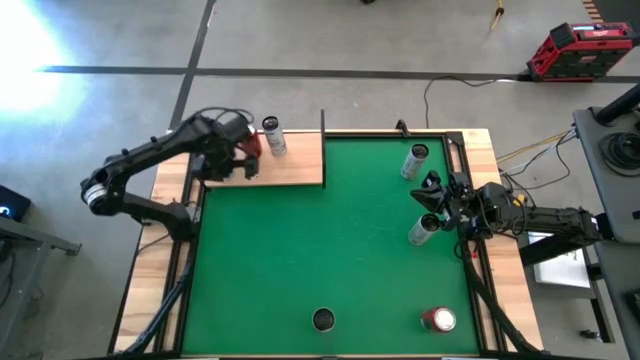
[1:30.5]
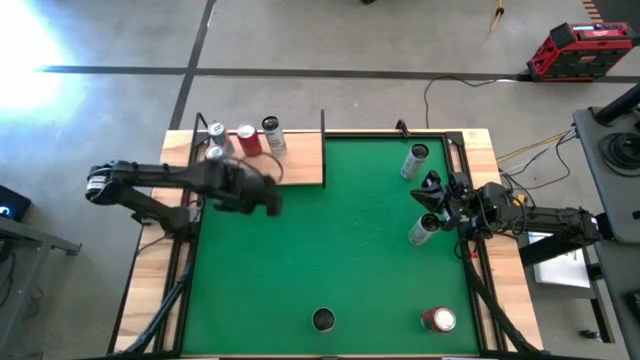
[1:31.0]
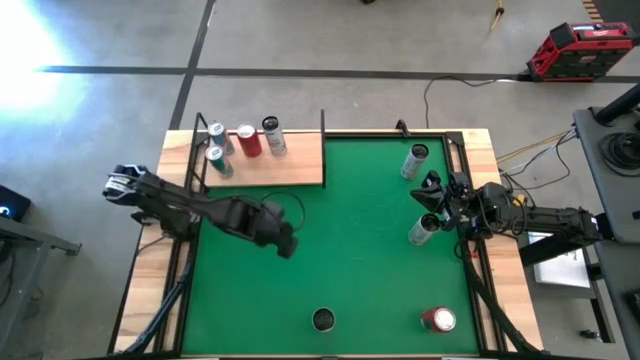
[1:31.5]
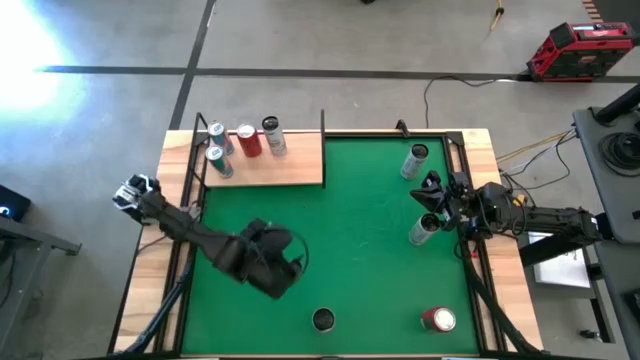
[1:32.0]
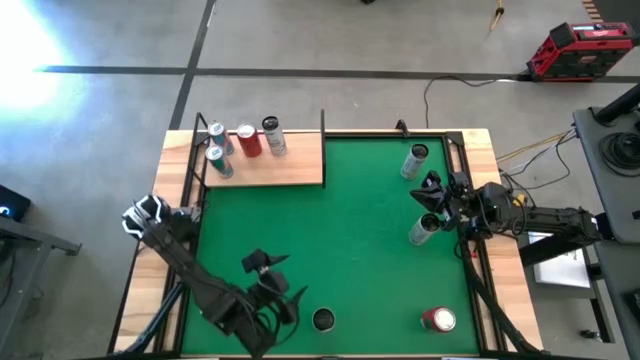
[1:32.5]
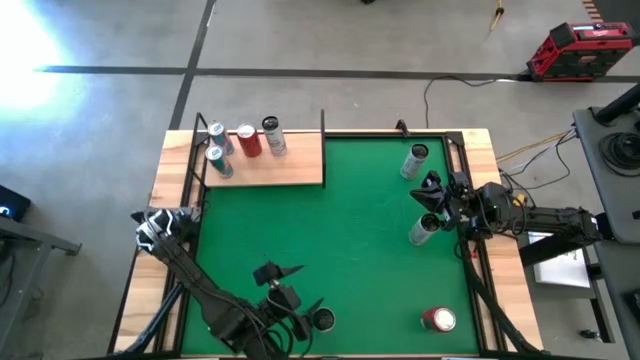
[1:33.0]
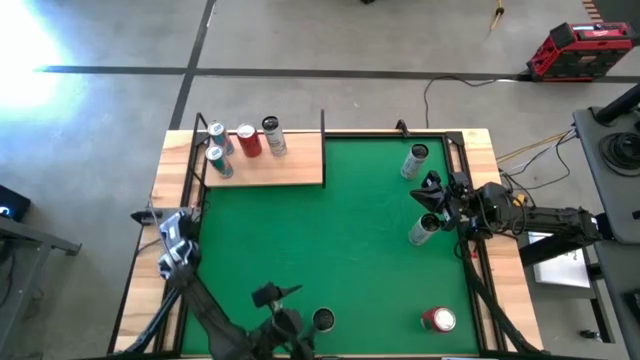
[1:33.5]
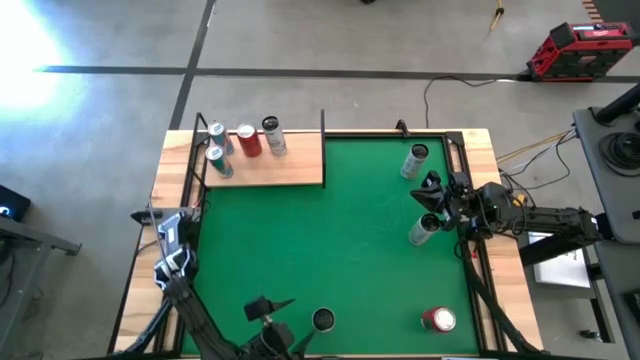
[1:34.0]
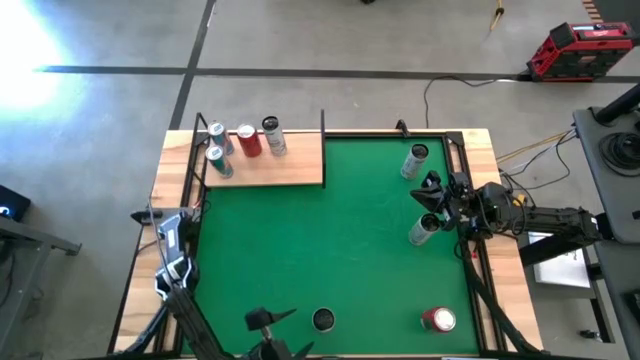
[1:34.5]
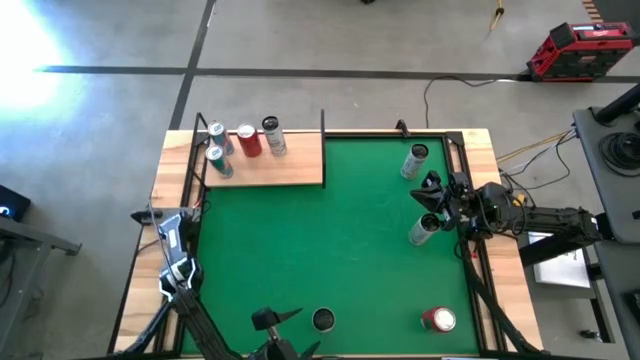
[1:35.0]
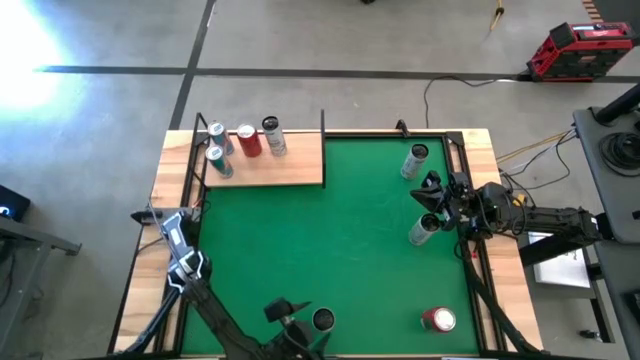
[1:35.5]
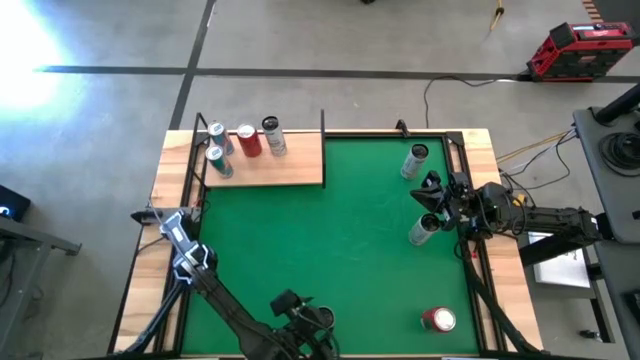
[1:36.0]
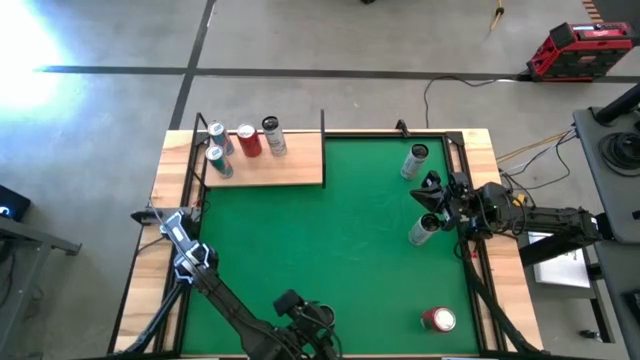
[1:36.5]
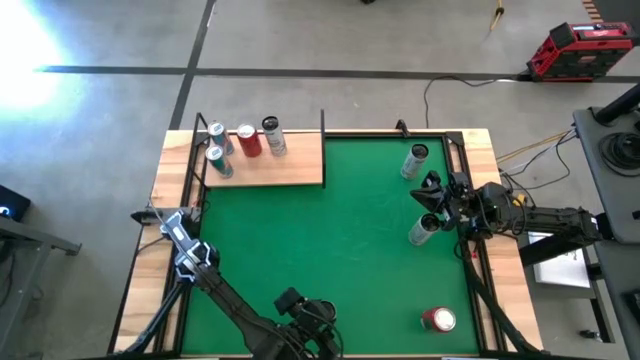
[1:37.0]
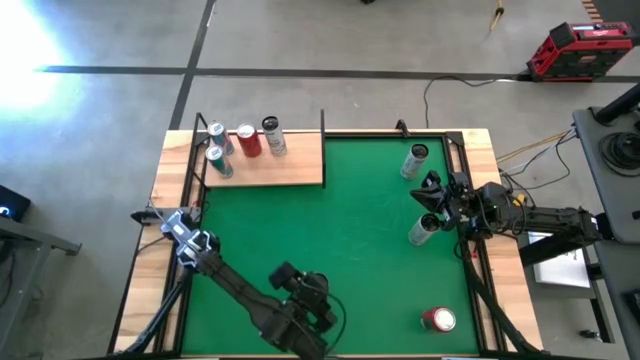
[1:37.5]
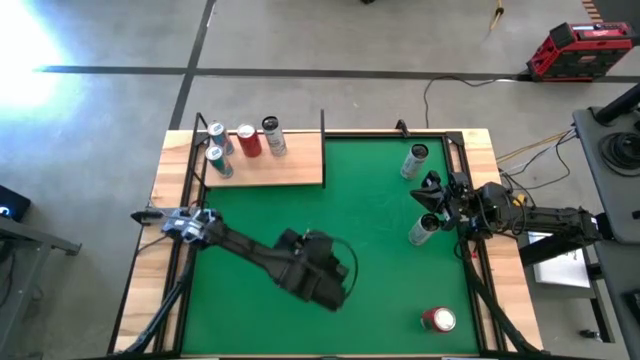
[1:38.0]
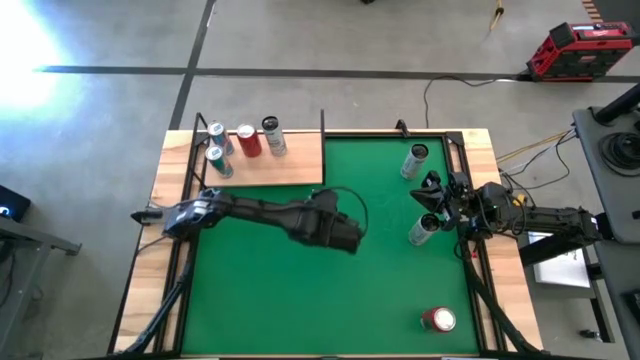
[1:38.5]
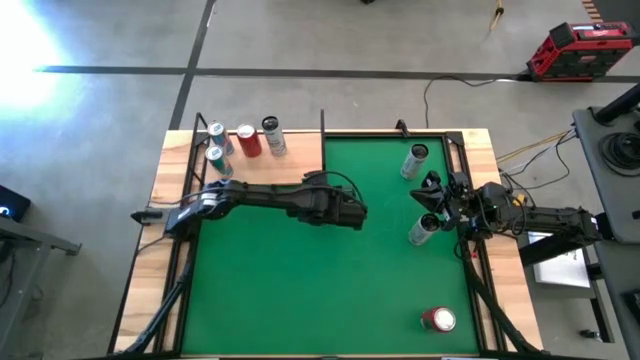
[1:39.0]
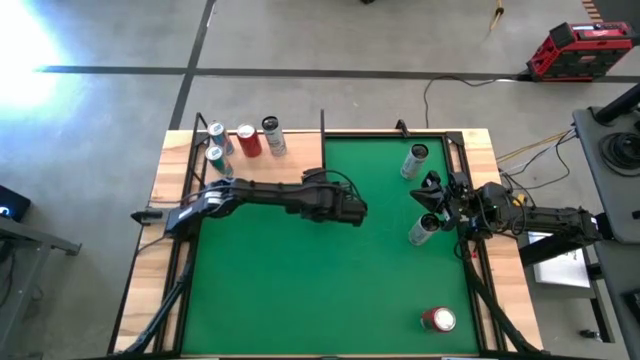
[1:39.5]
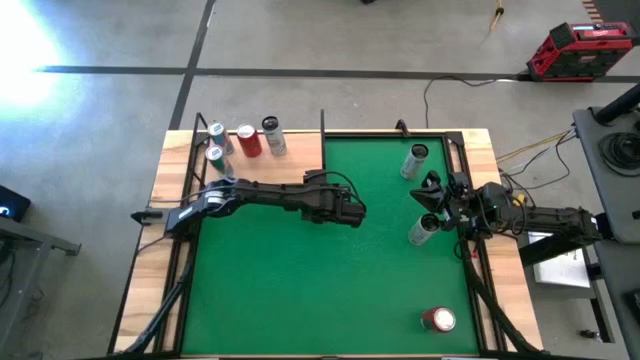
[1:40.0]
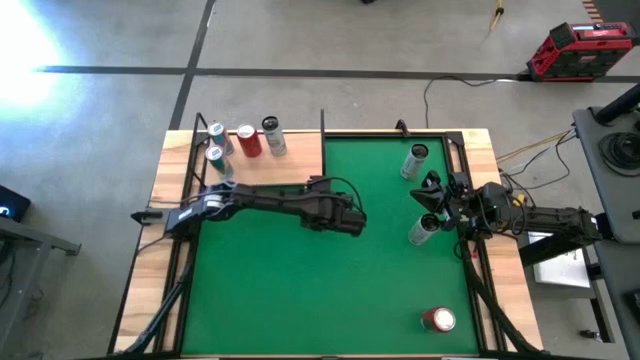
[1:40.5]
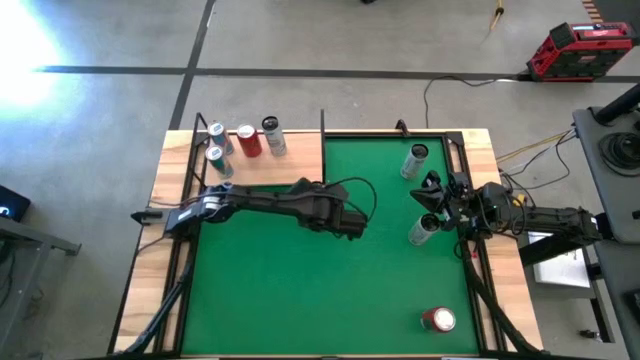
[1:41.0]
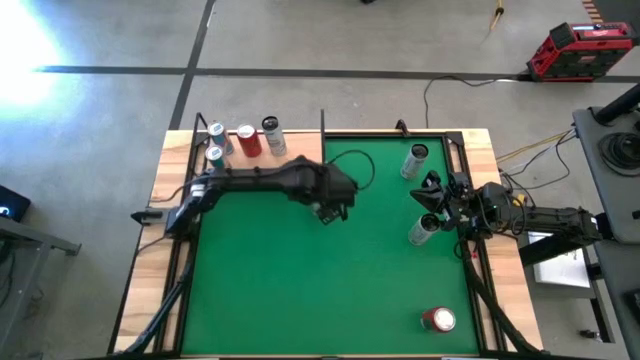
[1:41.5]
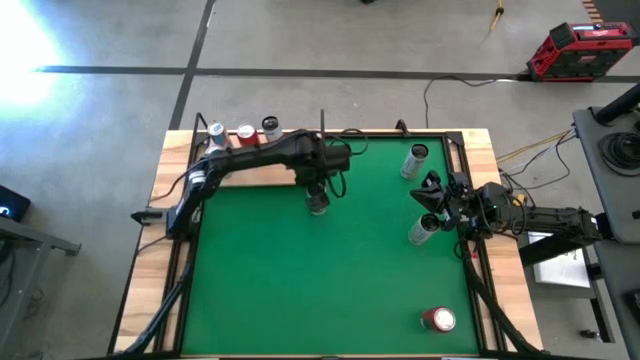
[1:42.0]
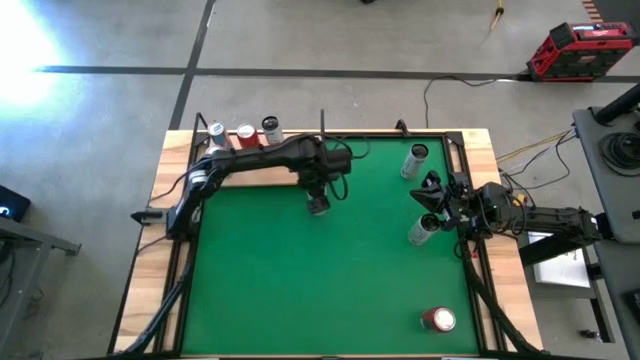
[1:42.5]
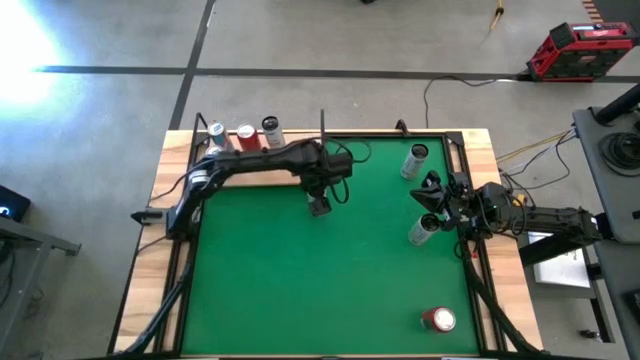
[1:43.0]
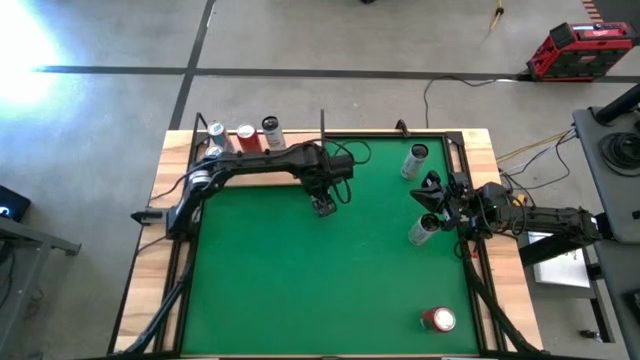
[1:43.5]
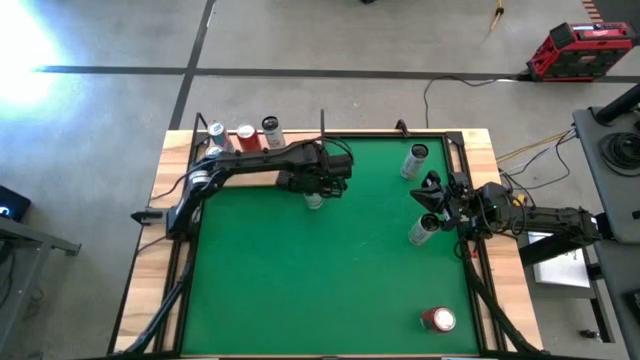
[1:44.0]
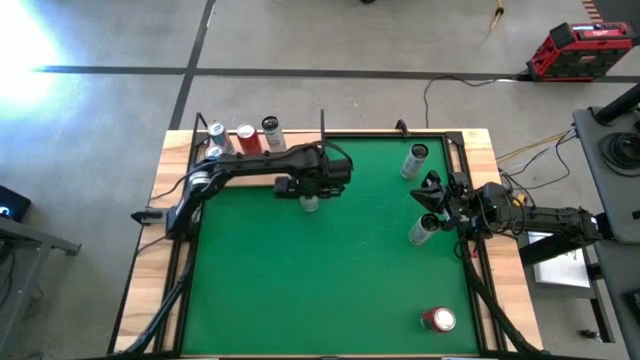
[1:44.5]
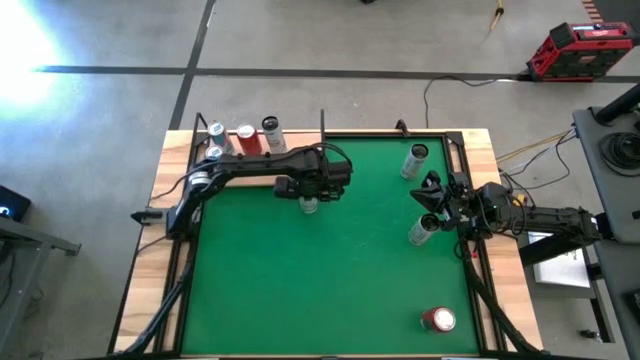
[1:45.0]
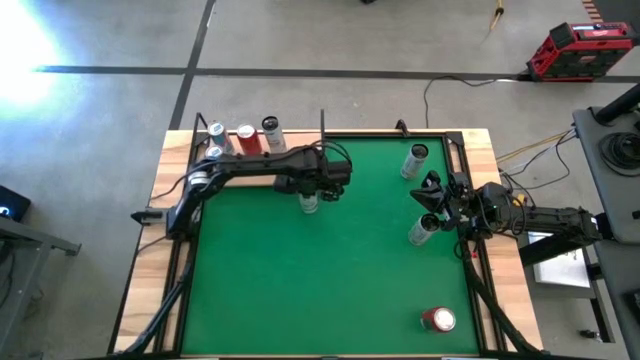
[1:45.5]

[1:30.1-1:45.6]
Task: Place canned beverage on shelf
Move the white blue soda can to the top center of the table

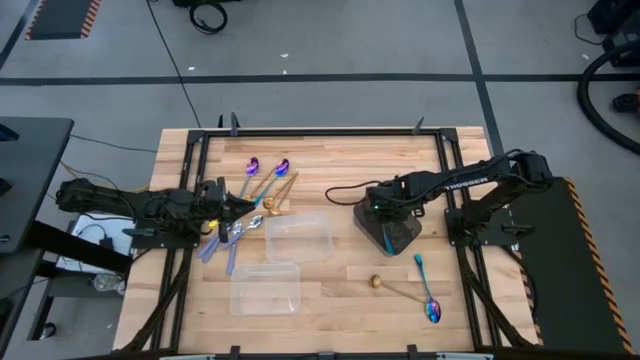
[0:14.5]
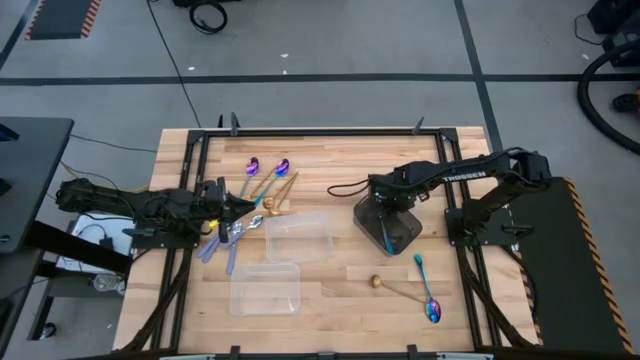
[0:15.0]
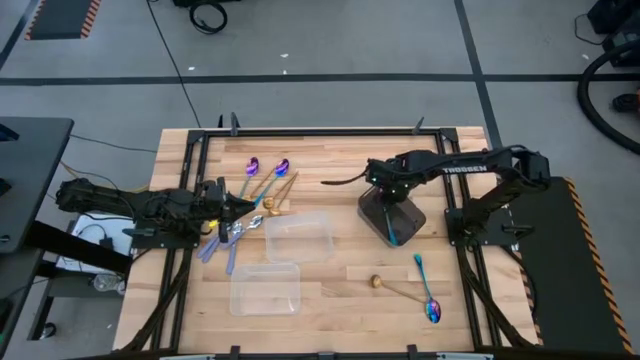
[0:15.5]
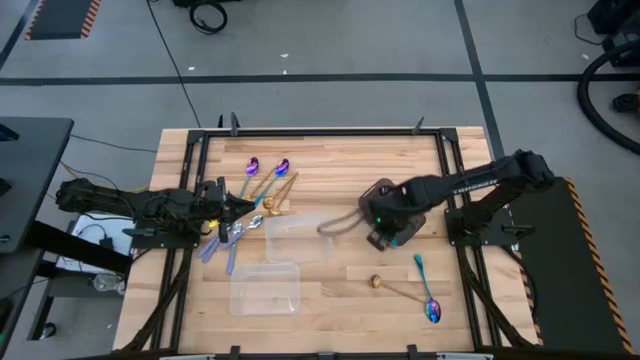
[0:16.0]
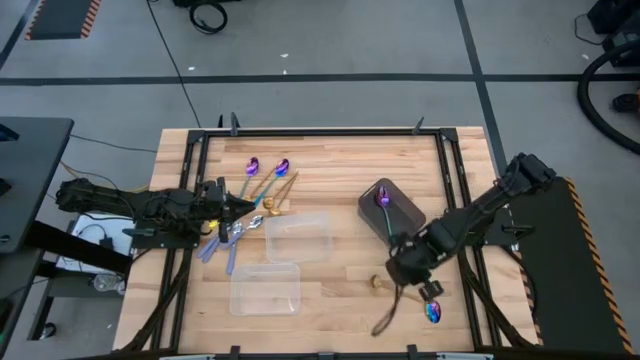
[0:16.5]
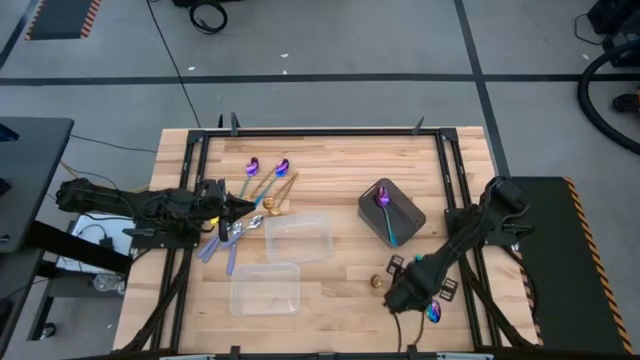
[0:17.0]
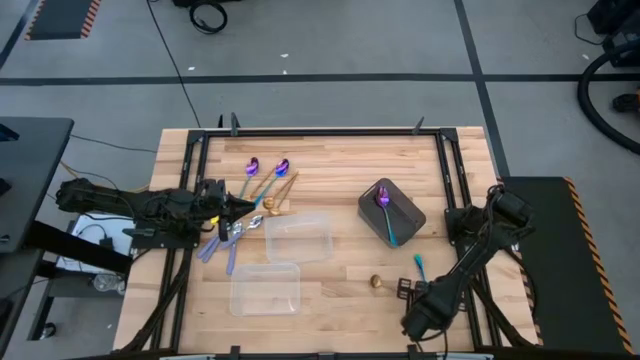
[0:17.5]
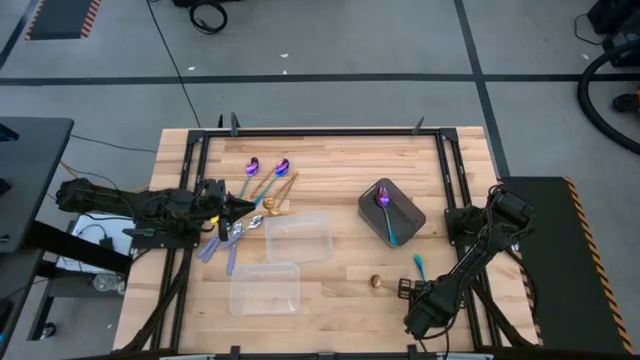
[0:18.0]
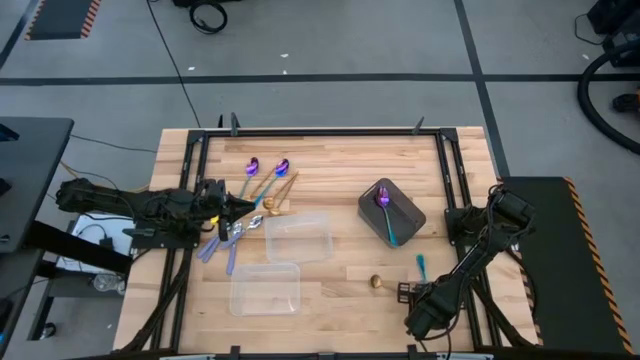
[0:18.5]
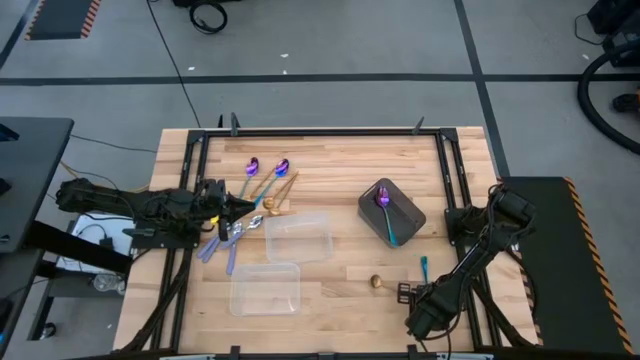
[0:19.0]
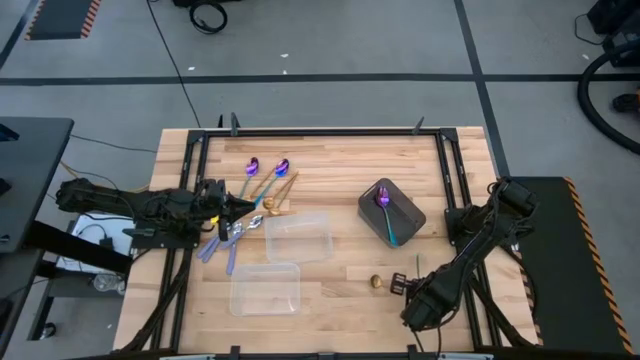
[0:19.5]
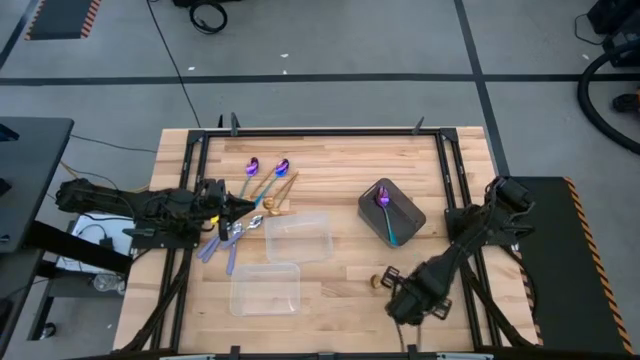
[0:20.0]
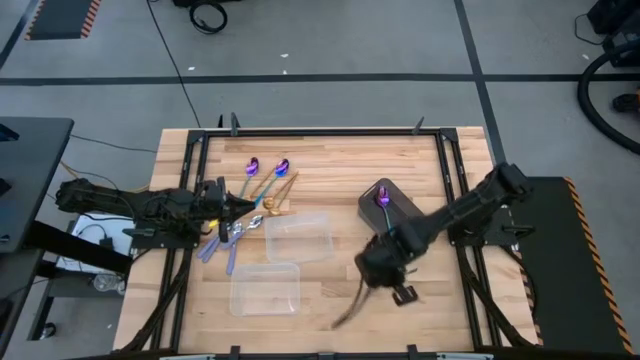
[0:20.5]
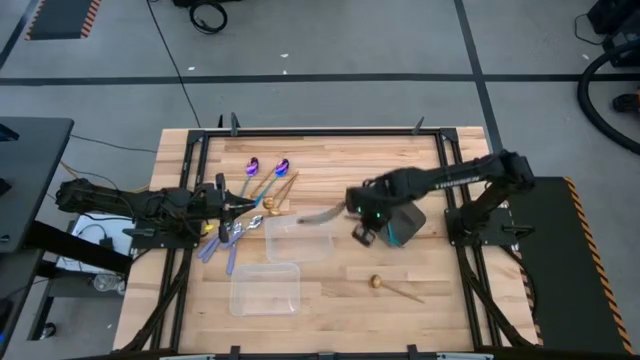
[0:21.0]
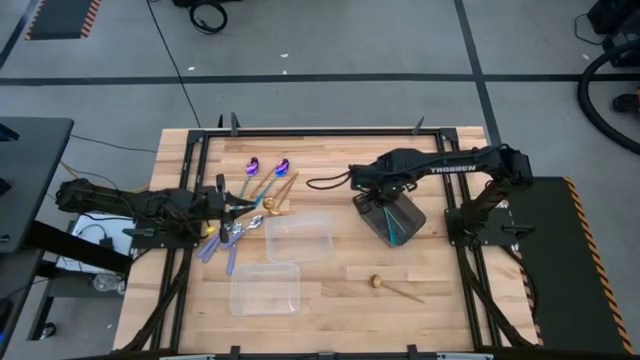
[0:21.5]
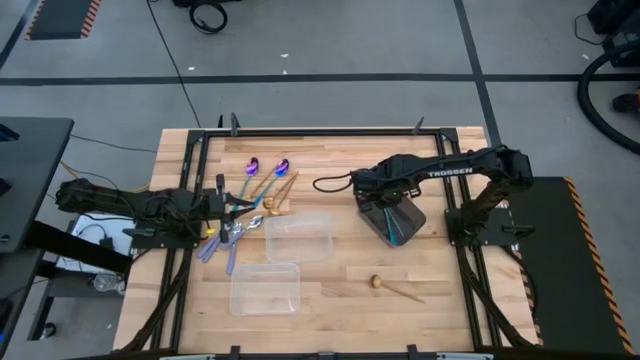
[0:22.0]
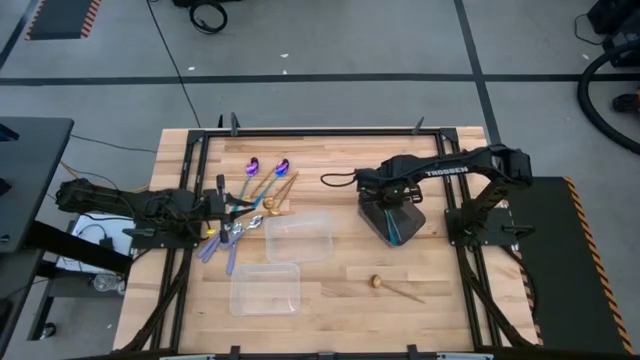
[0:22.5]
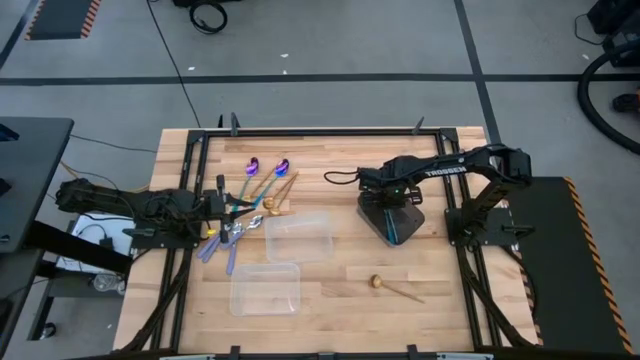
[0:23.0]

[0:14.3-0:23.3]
Task: Sort silverware by color (type)
Put the blue spoon into the black transparent bin
